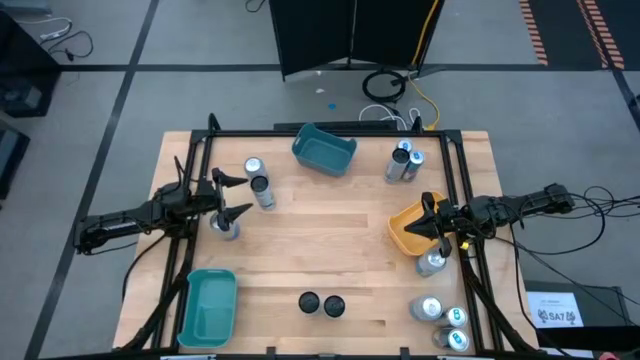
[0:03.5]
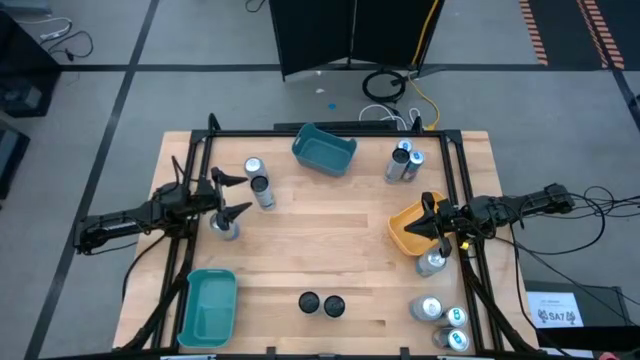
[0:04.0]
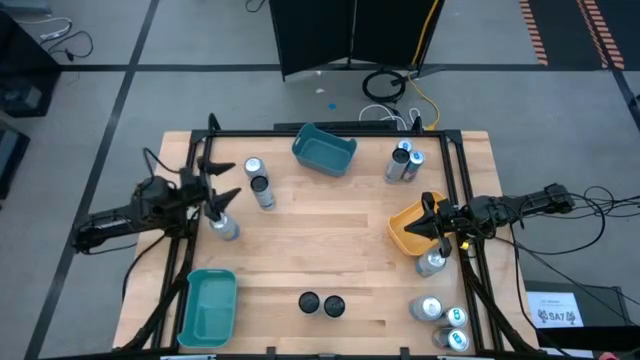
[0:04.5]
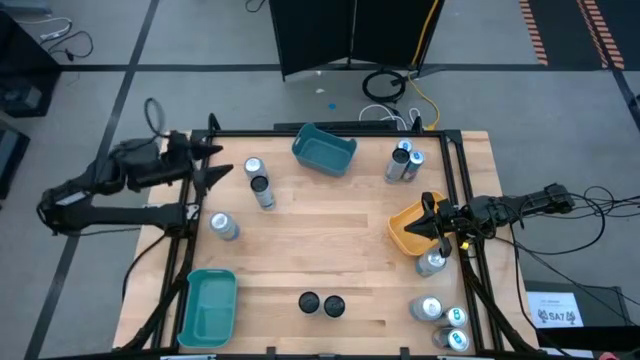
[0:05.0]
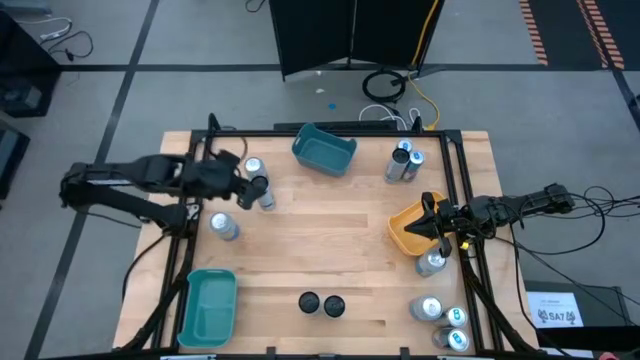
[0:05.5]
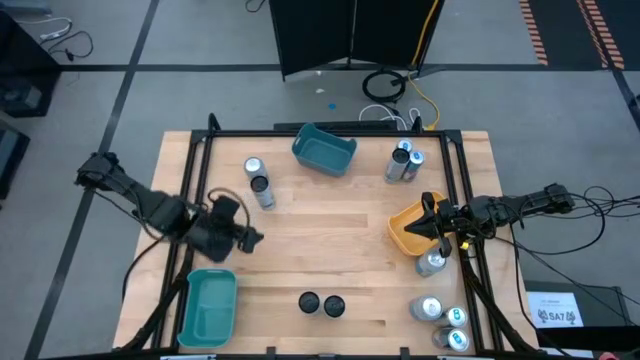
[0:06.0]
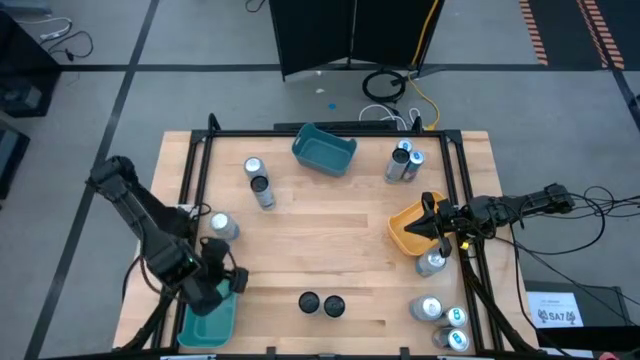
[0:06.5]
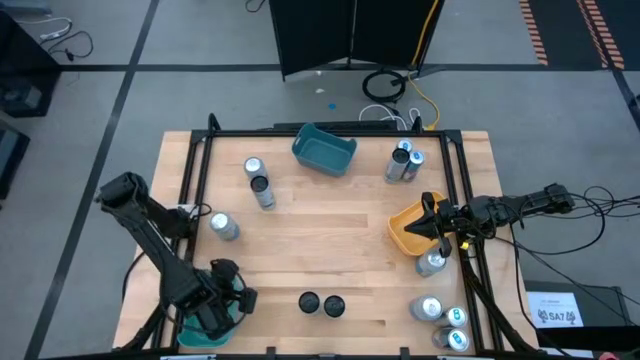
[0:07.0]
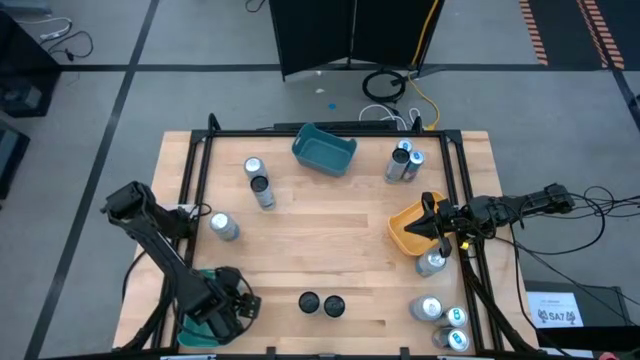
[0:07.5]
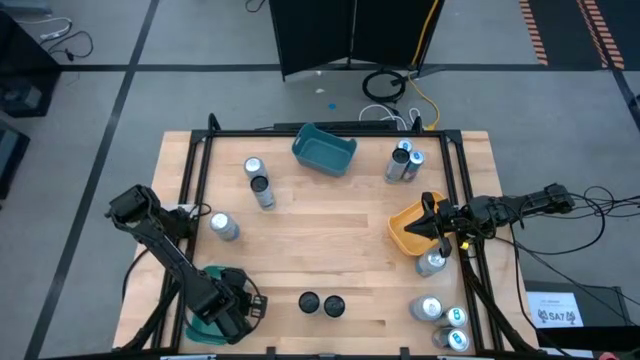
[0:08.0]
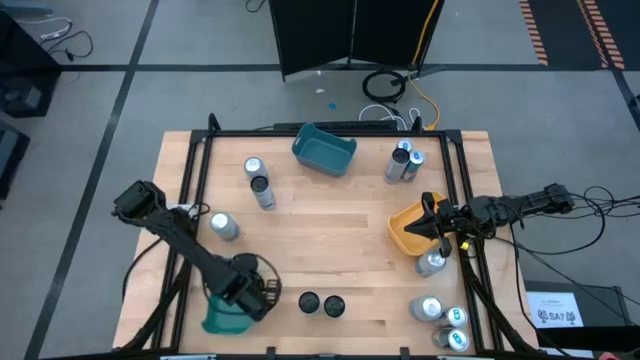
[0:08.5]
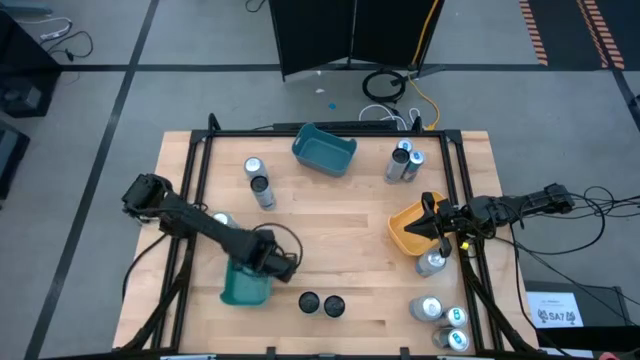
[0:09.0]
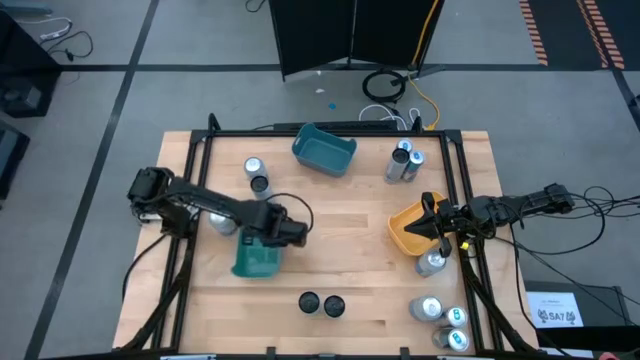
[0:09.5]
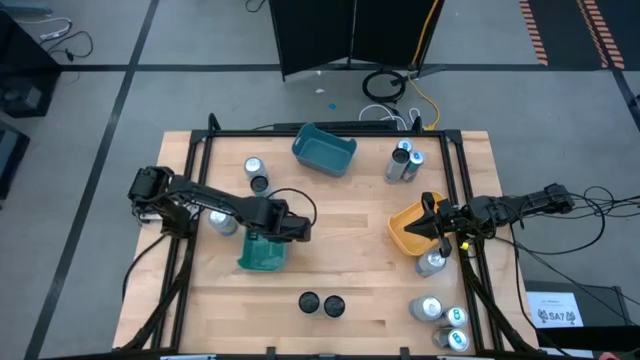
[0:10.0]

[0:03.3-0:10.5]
Task: Sort soda cans
Prepare the green bin

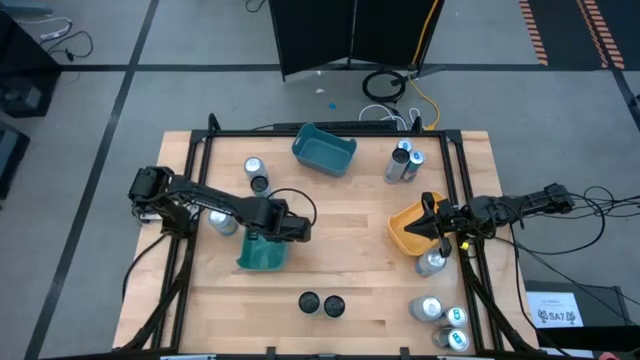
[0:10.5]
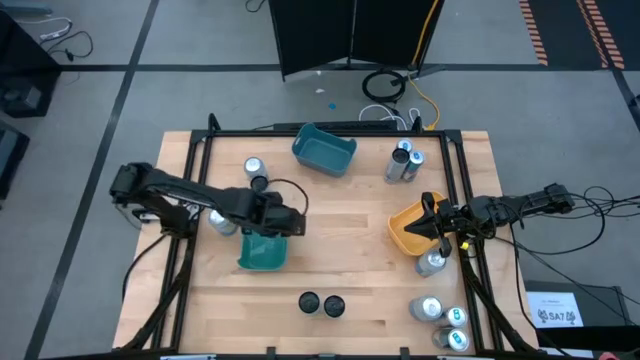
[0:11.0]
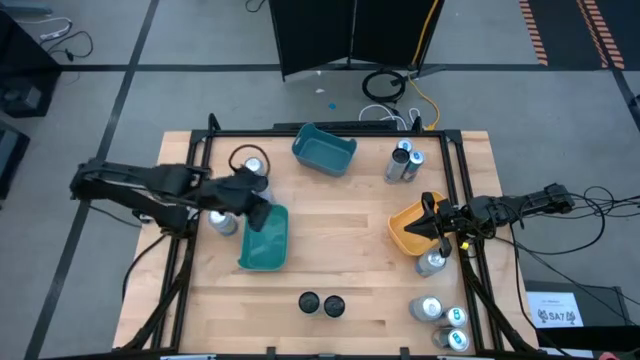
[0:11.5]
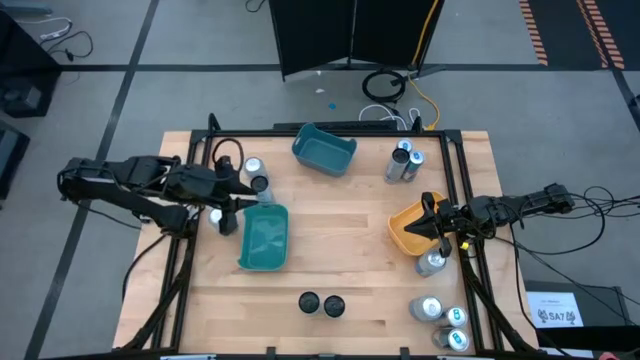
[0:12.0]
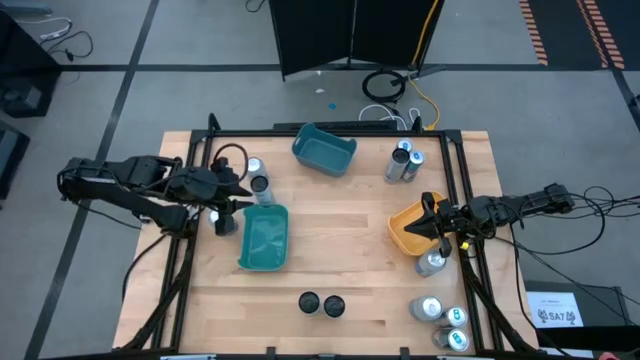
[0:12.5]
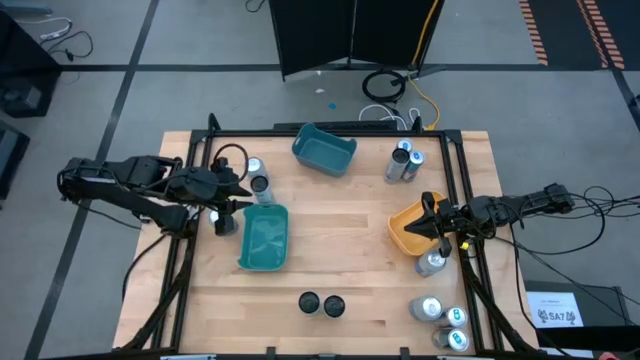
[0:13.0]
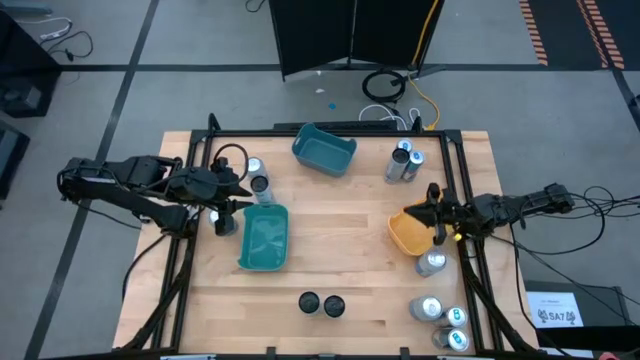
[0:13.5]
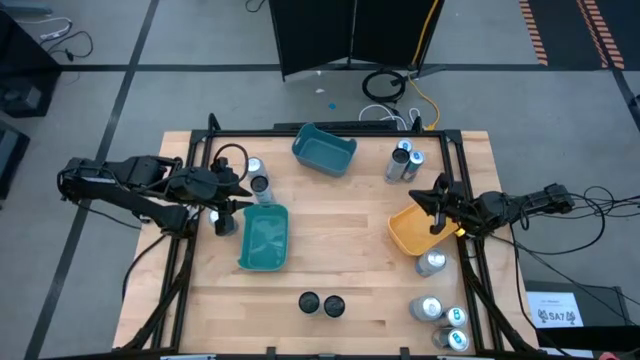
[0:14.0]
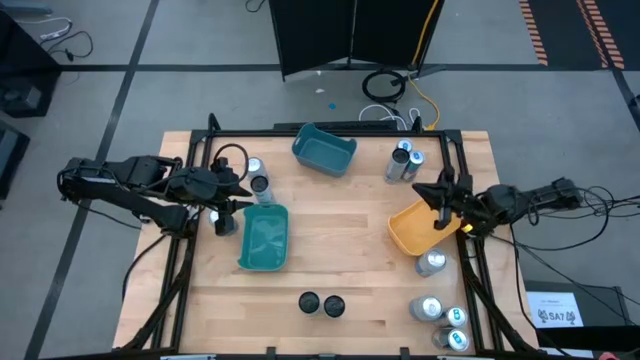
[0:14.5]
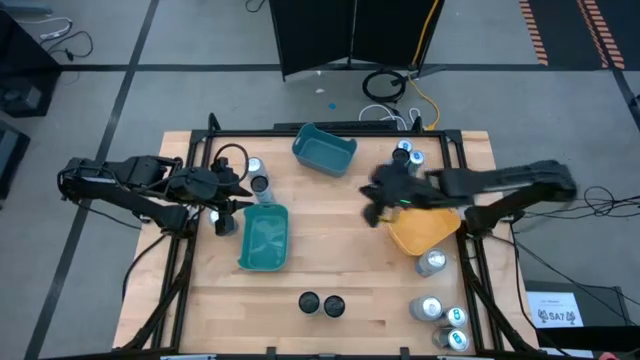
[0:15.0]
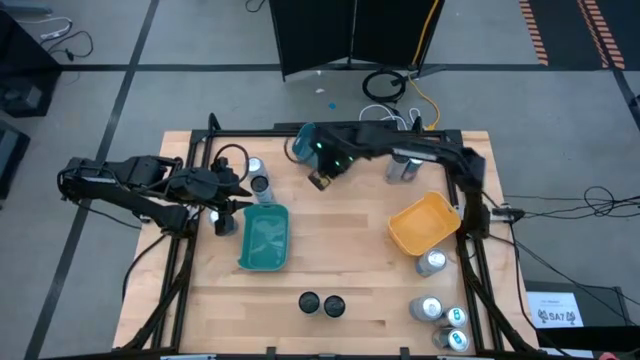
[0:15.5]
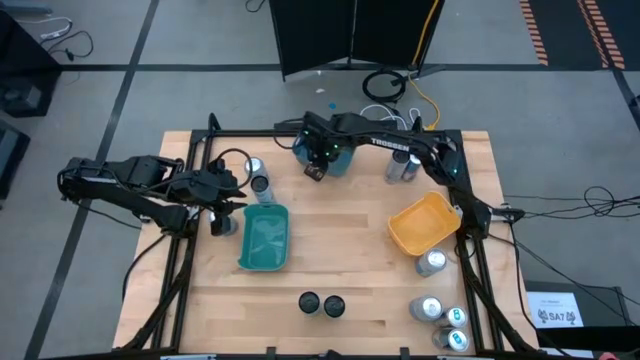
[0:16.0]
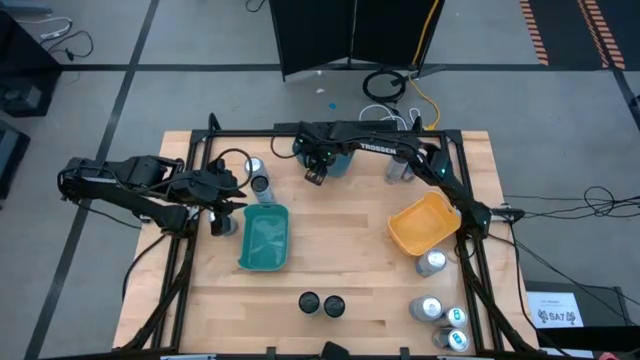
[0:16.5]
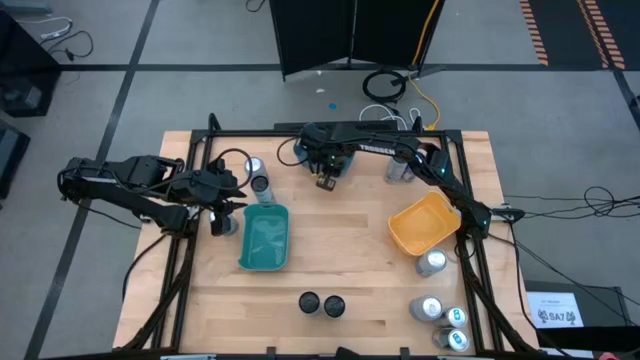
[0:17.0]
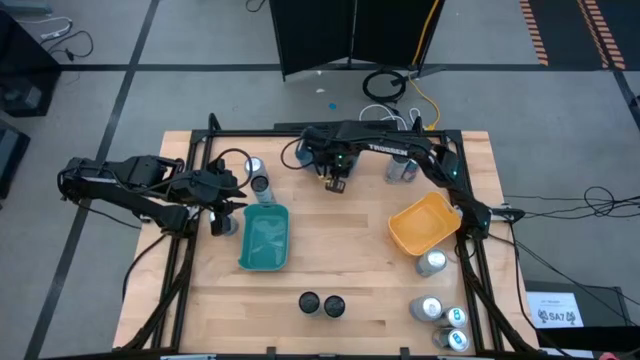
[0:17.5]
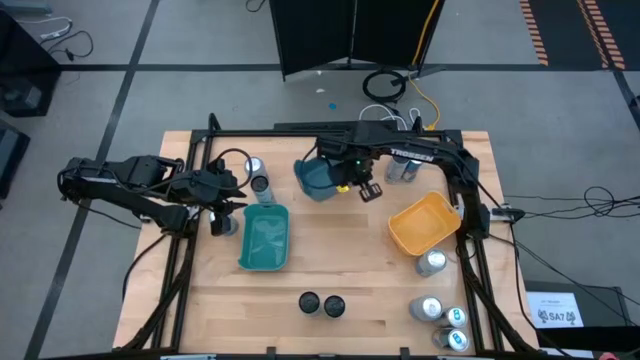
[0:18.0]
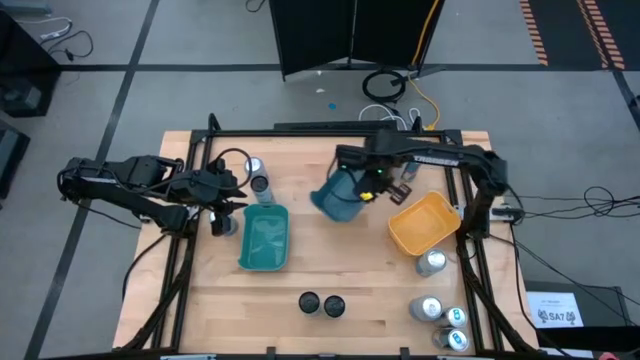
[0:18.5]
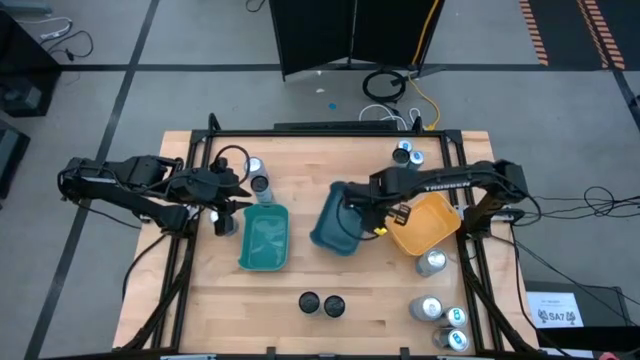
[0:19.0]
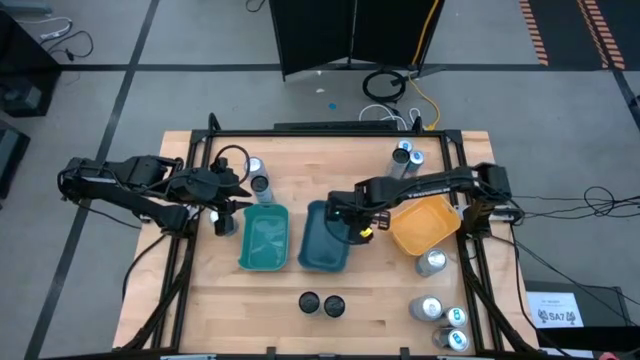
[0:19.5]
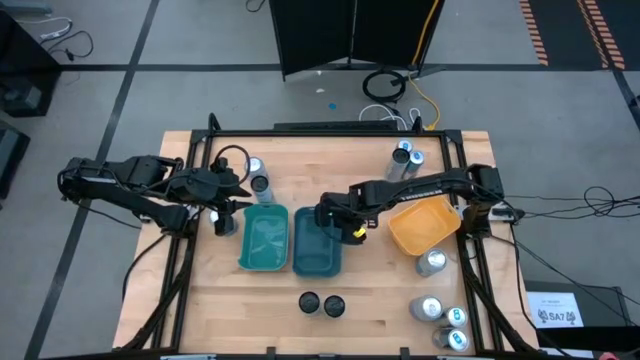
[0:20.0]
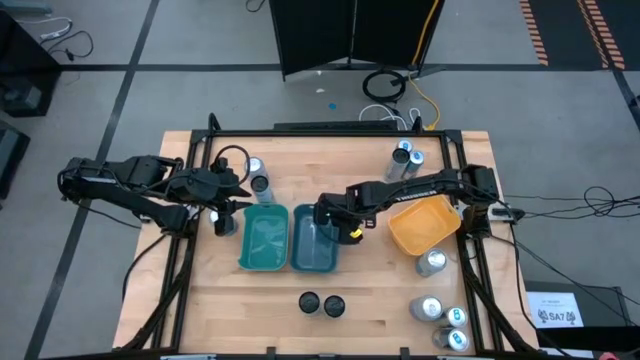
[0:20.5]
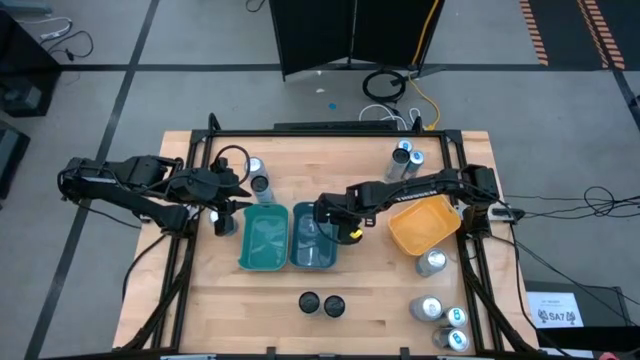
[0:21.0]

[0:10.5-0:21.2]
Prepare the blue bin

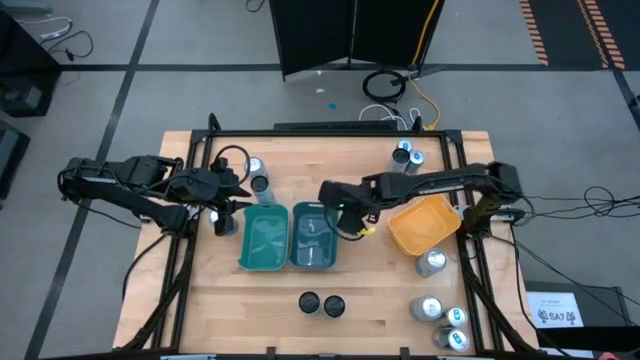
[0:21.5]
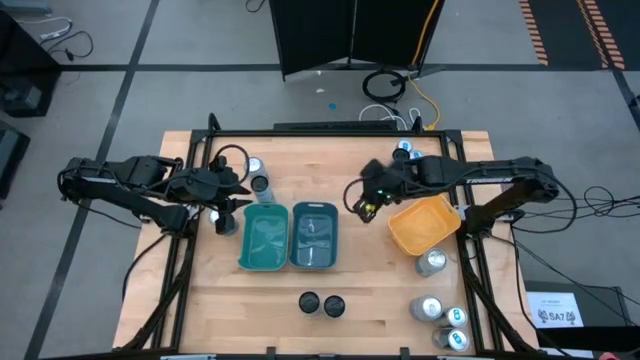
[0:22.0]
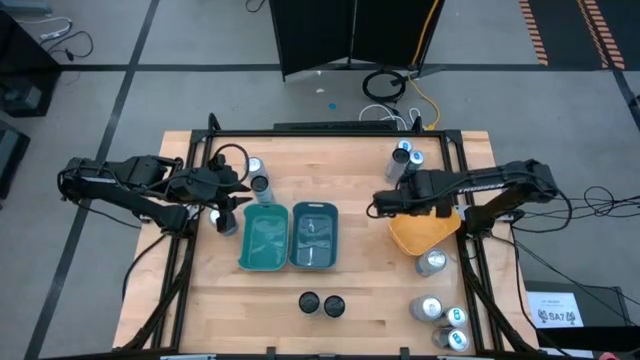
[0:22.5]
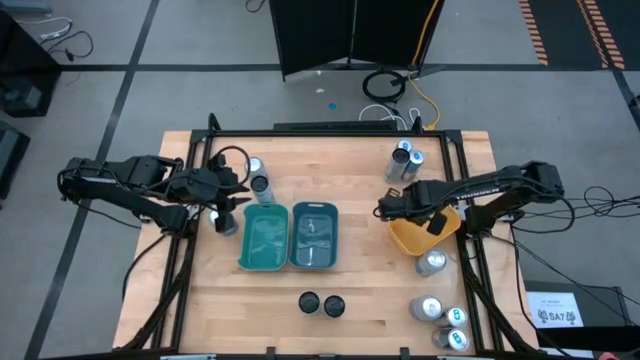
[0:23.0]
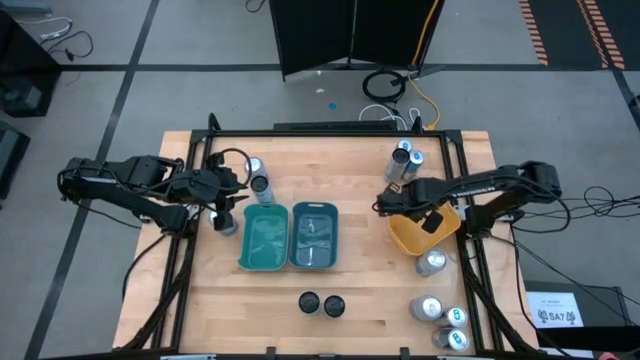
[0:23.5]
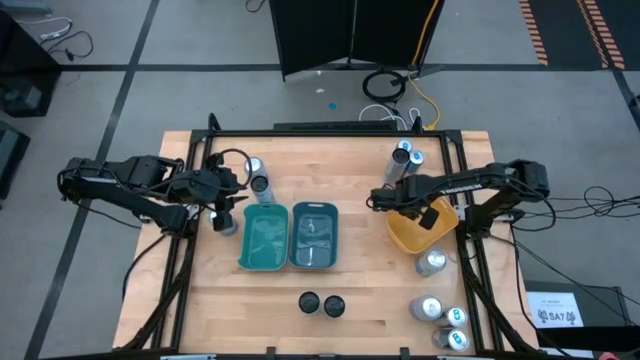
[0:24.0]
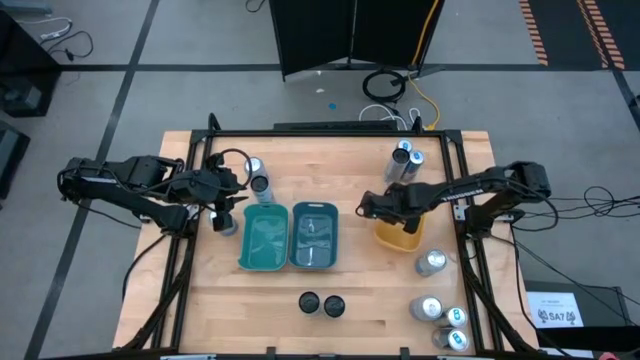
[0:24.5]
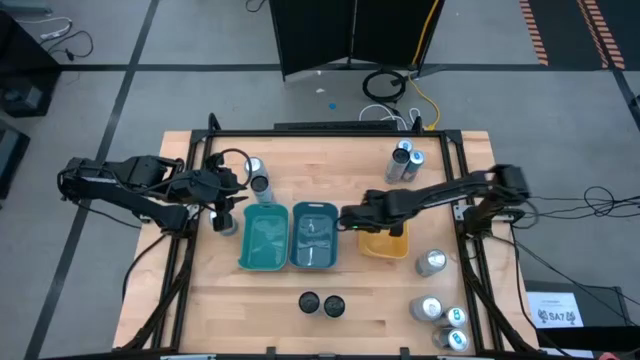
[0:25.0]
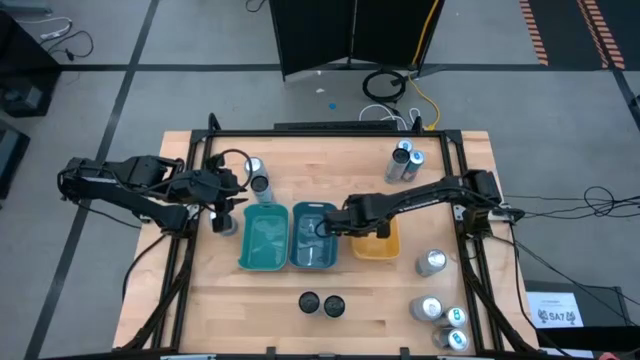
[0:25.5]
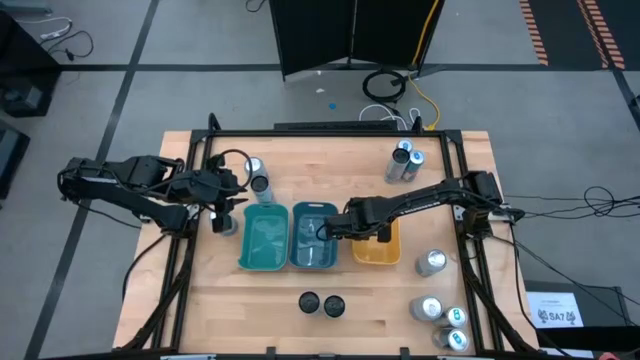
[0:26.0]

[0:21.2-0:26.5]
Prepare the yellow bin
